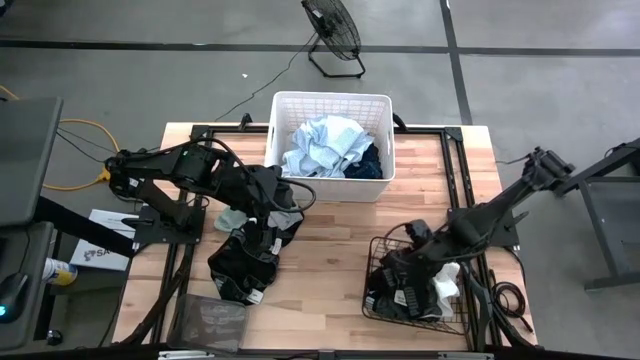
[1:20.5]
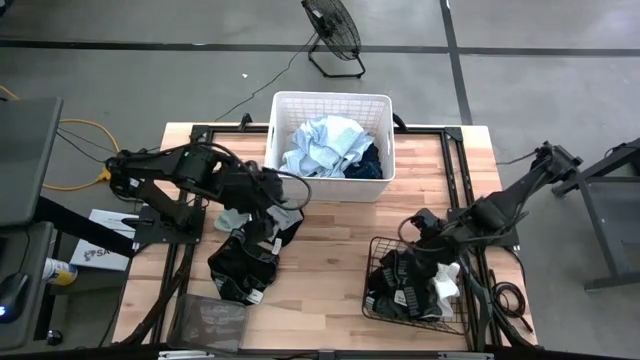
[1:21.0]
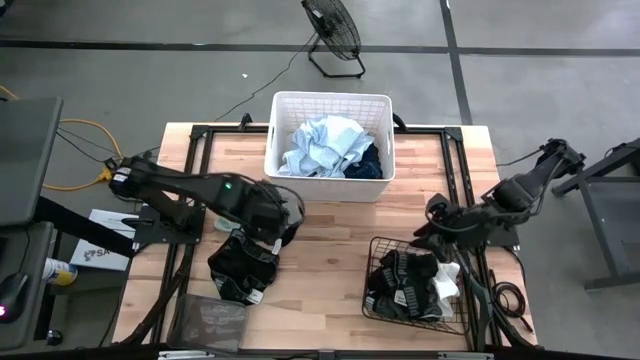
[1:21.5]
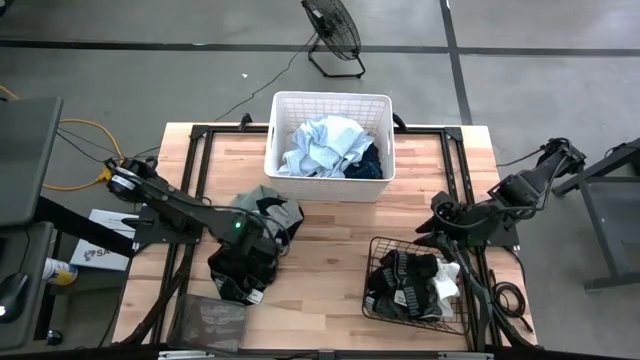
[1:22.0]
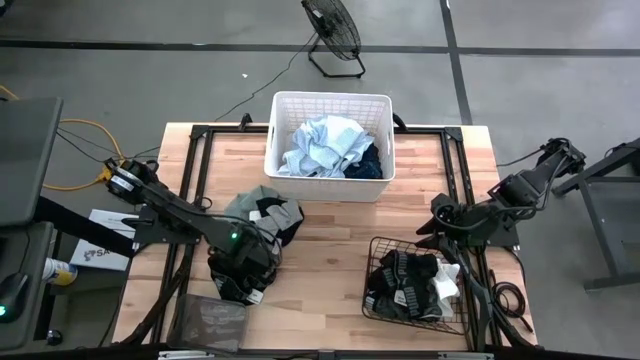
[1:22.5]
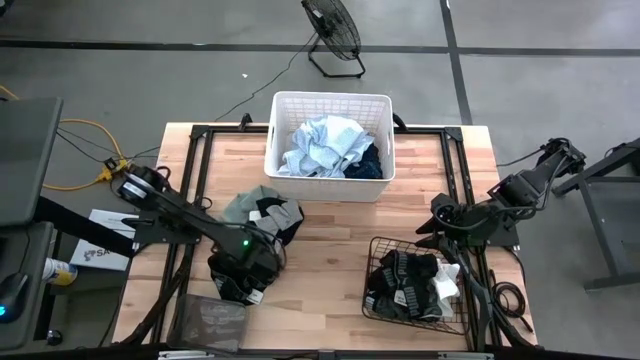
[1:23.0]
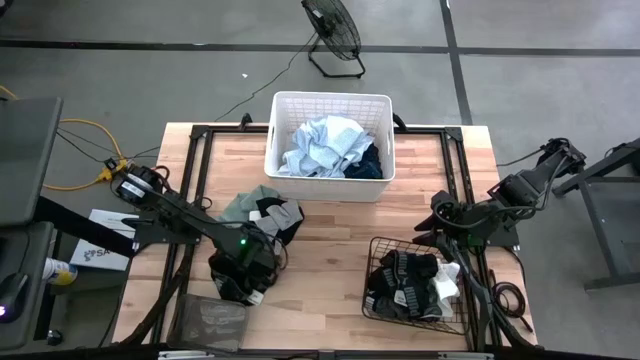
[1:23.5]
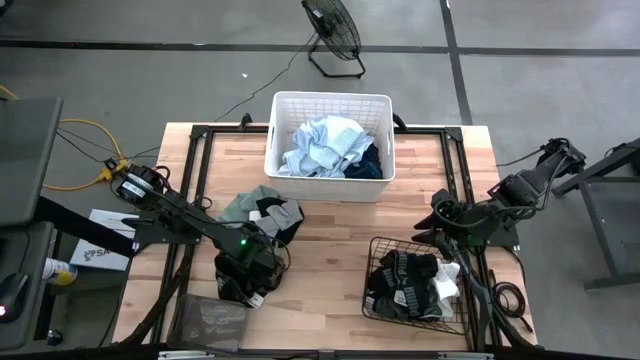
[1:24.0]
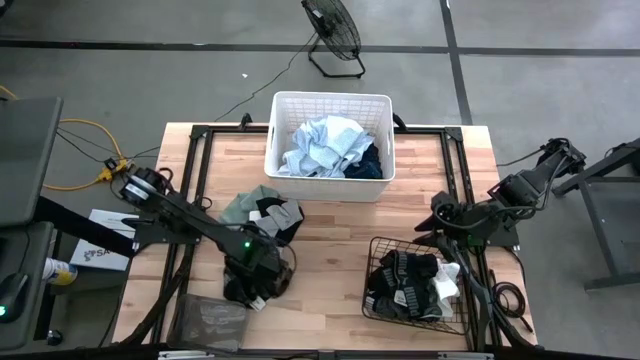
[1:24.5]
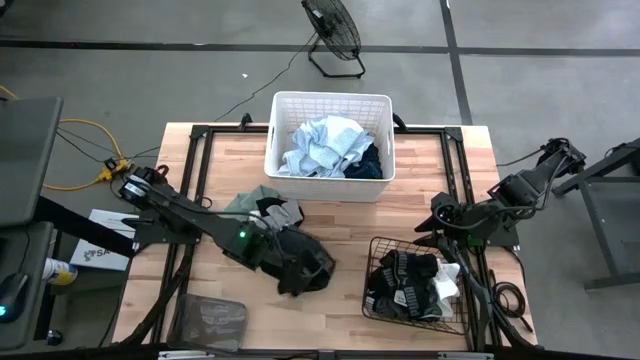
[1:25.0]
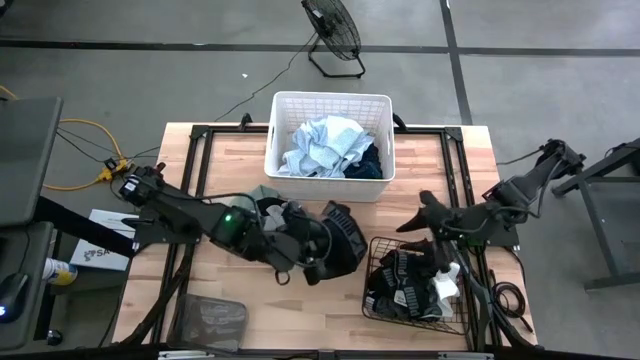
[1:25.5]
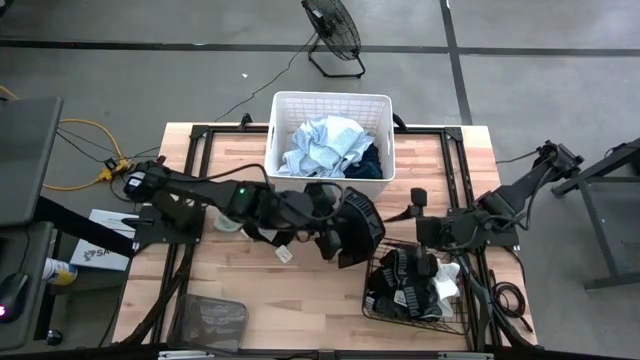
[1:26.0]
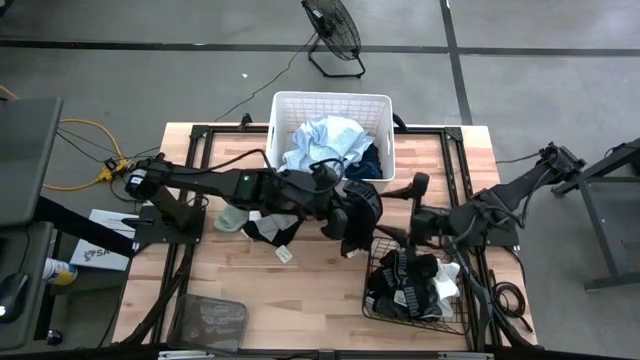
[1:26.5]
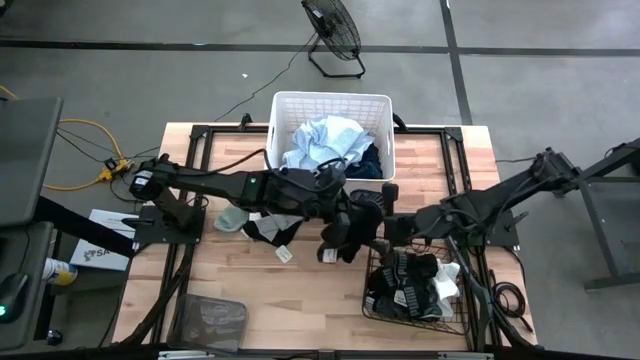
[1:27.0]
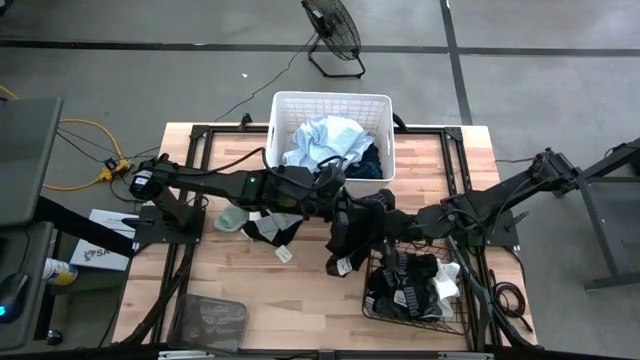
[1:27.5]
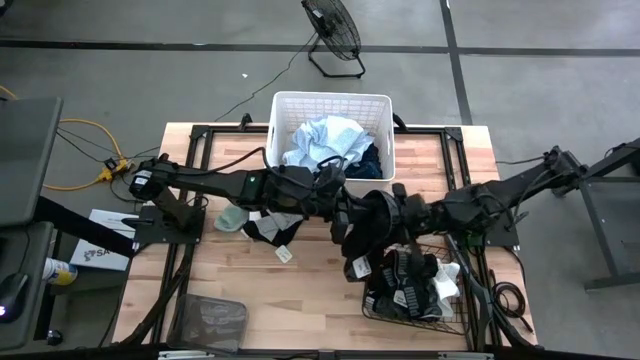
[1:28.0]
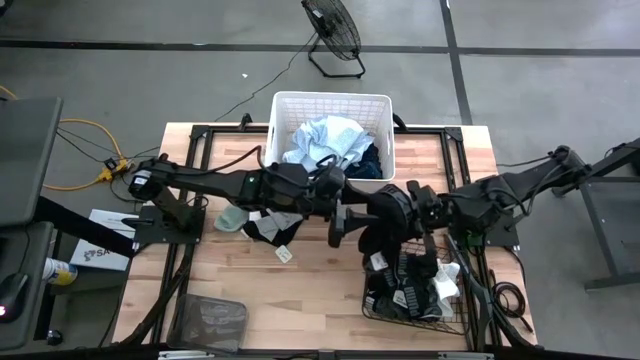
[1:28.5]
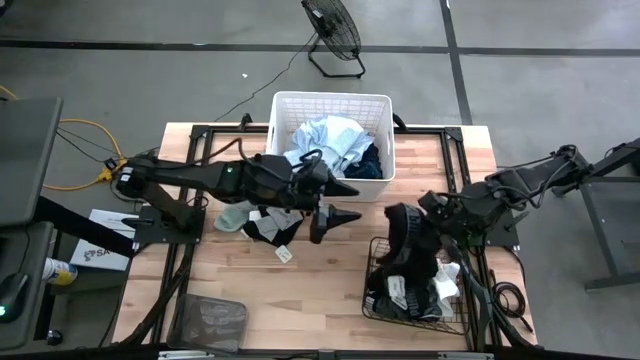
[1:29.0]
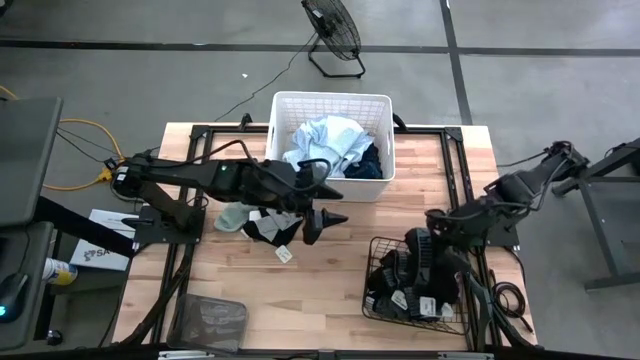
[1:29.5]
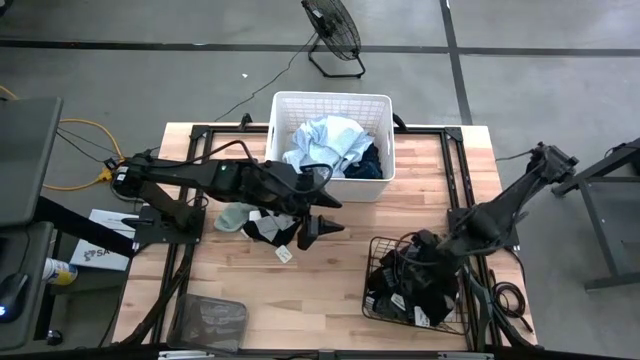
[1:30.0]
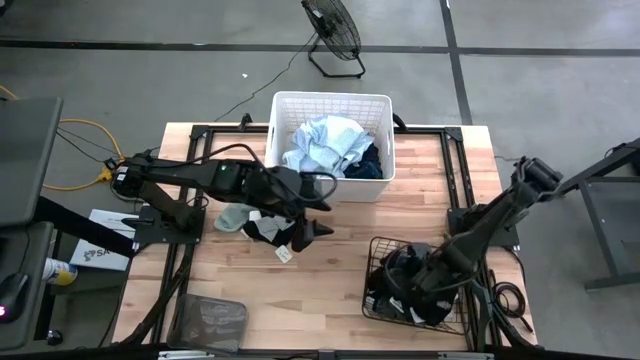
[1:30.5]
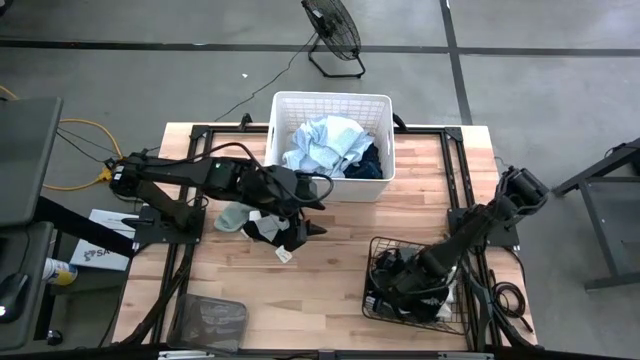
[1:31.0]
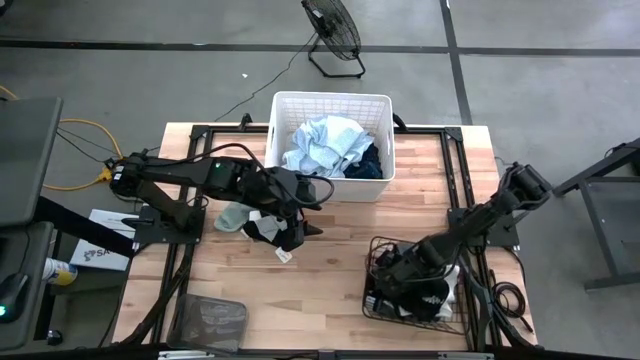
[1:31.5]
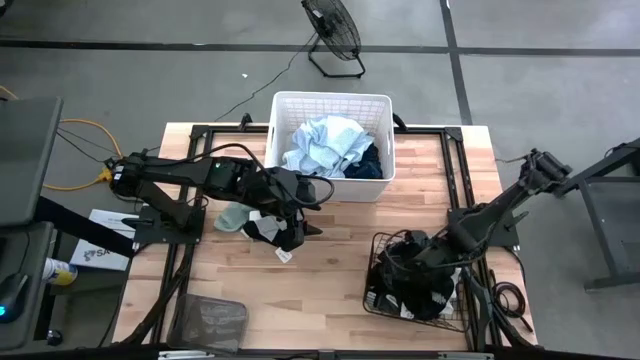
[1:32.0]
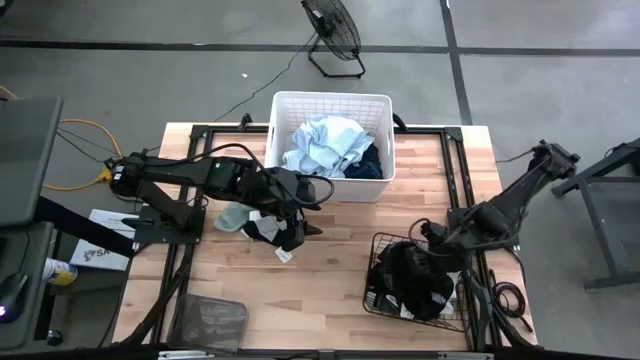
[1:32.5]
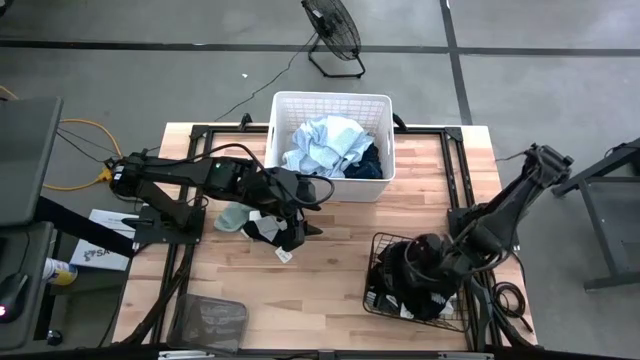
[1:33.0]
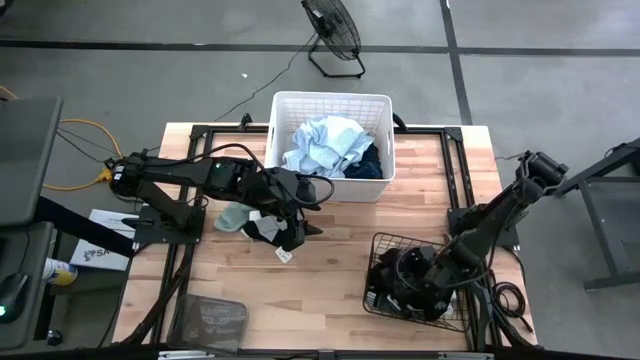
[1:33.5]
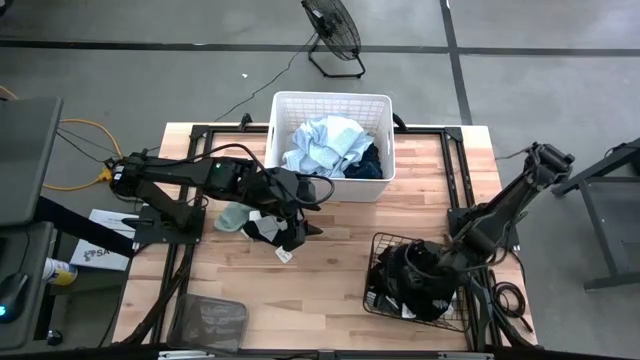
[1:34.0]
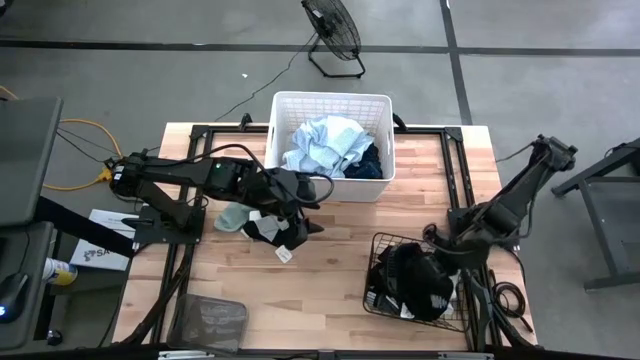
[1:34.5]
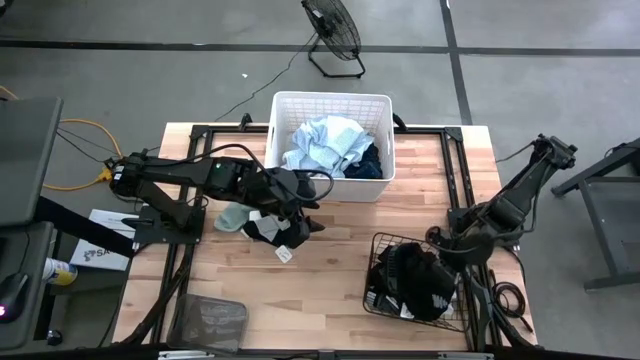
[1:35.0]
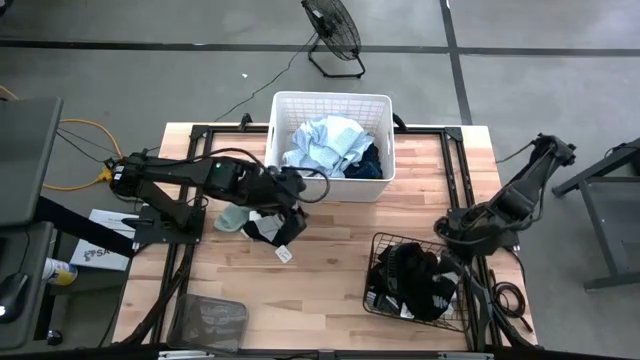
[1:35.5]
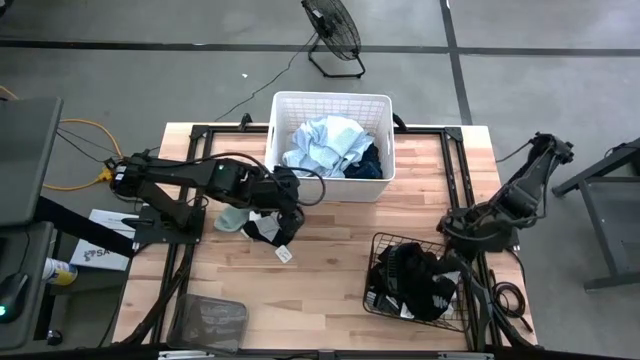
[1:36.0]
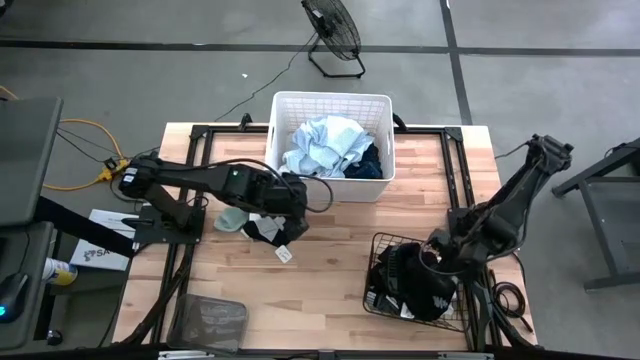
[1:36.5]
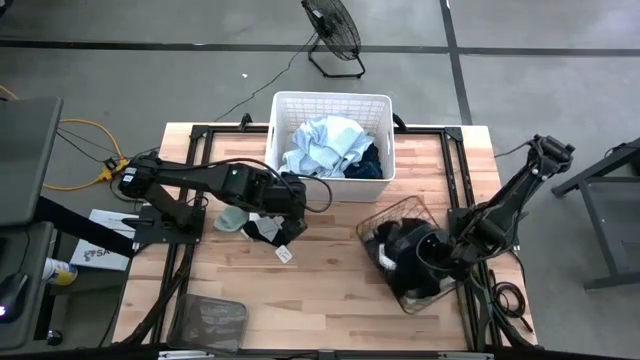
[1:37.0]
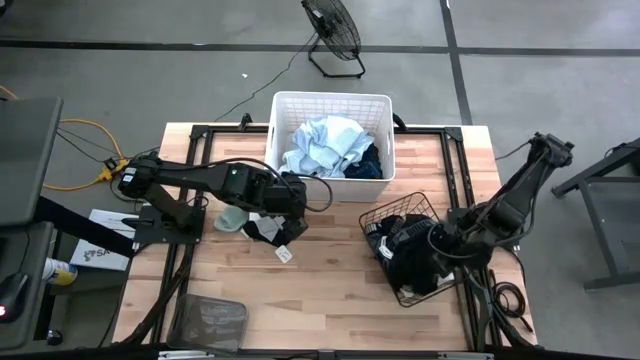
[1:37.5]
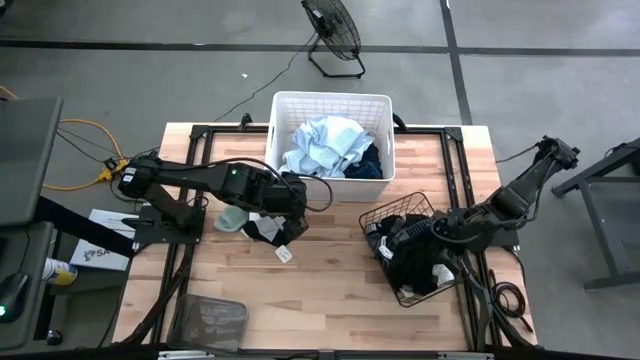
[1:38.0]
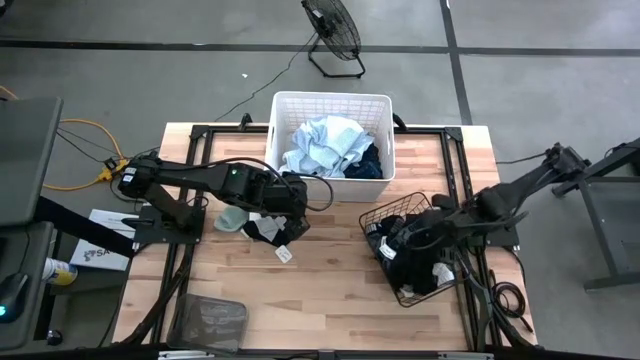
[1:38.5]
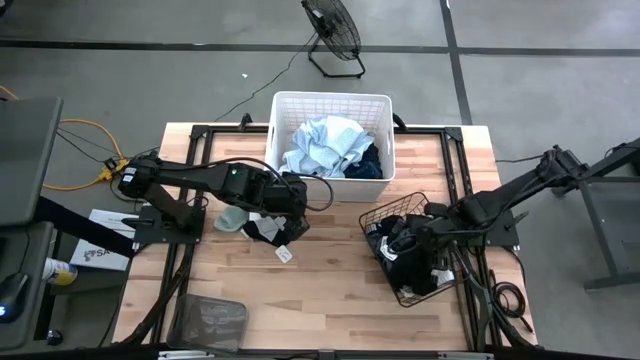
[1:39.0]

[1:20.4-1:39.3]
Task: Pick & Place Cloths
Put the black boxer into the wire basket

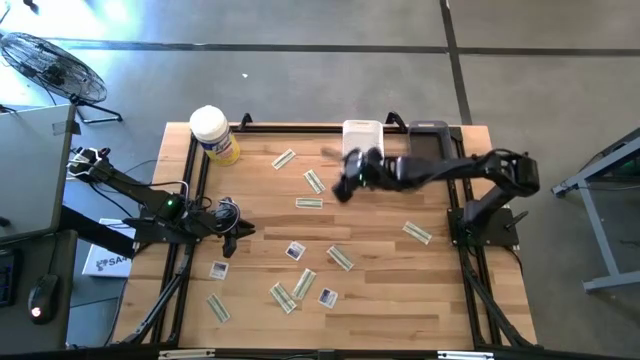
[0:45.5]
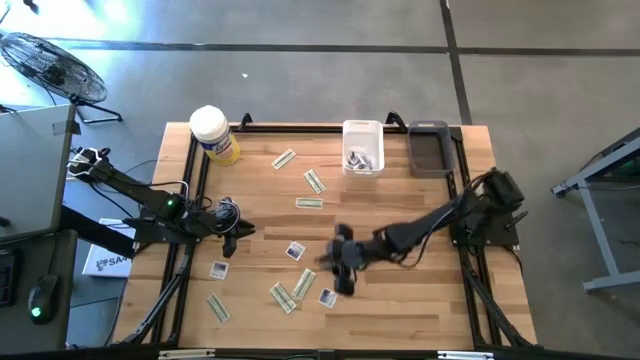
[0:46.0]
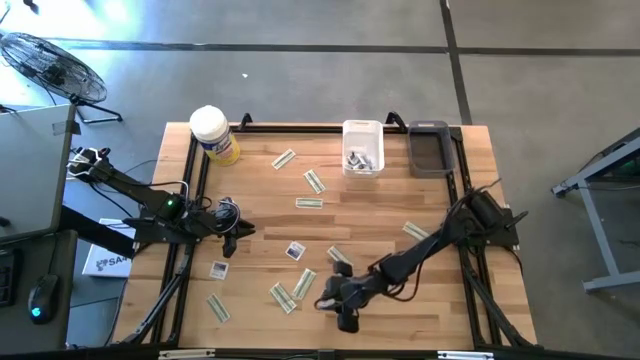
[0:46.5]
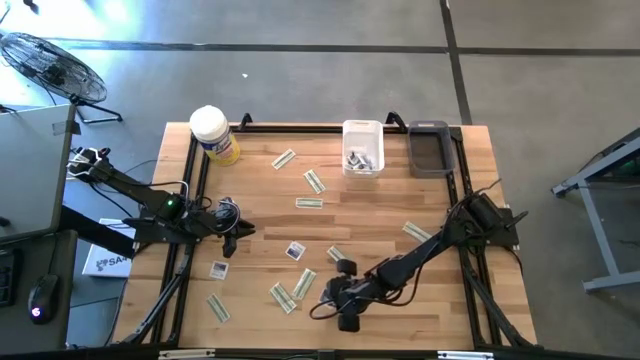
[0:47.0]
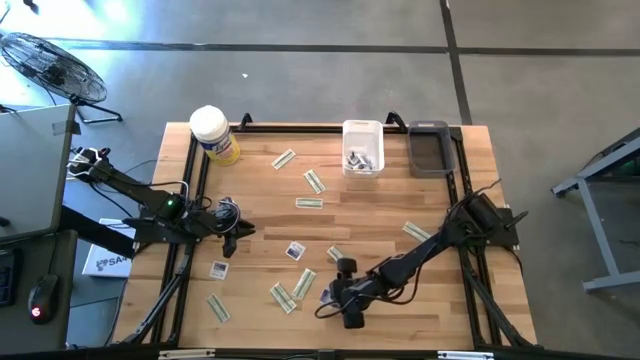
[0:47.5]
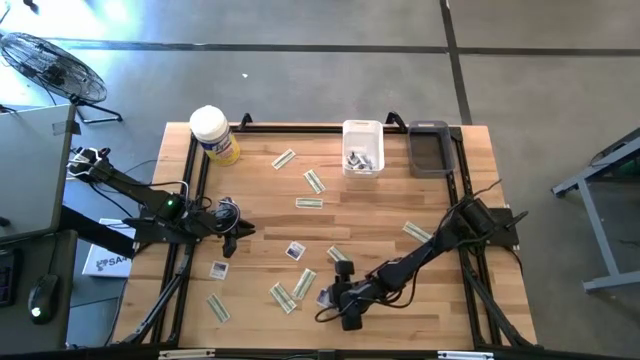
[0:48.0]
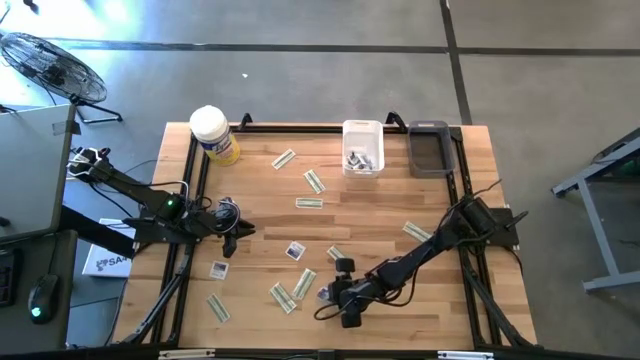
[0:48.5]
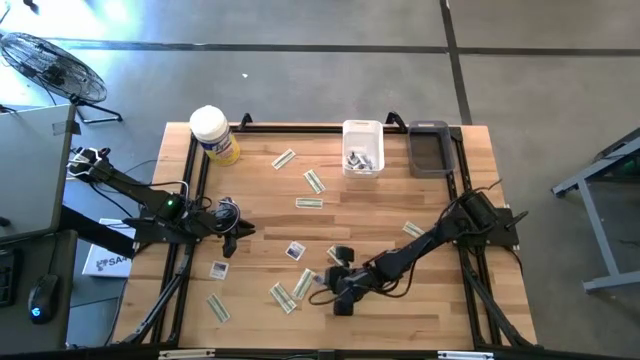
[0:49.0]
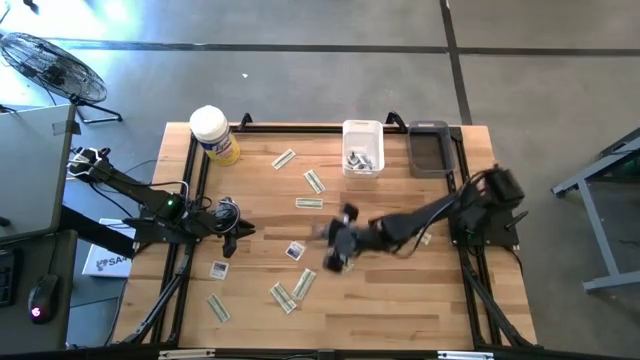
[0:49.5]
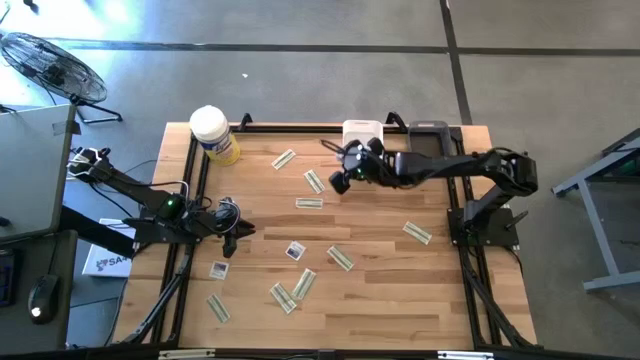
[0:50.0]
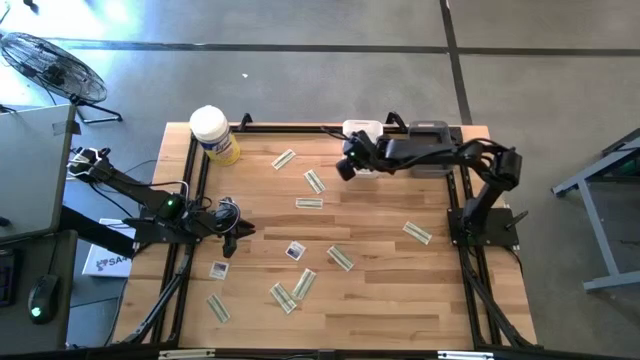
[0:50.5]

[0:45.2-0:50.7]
Task: Pick & Place First Aid Supplies
Put the blue alcohol pad into the white bin
